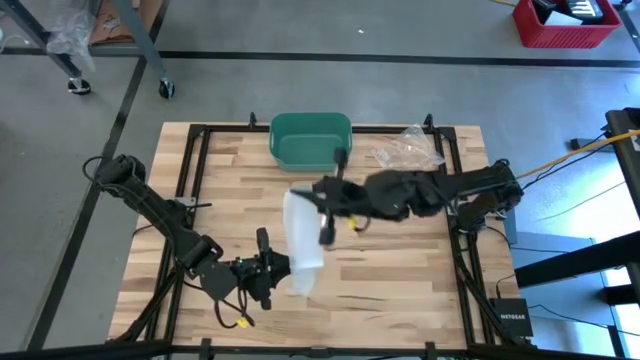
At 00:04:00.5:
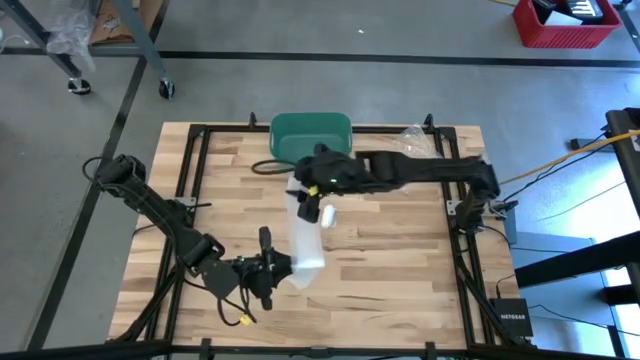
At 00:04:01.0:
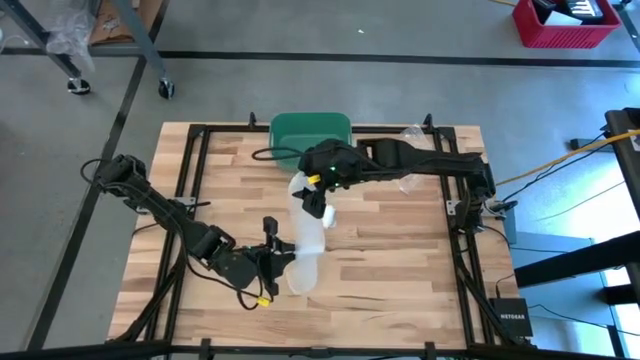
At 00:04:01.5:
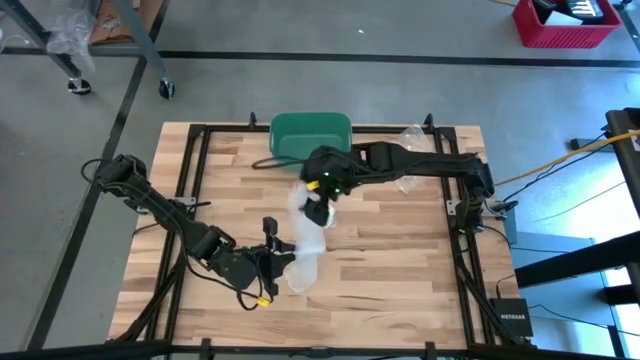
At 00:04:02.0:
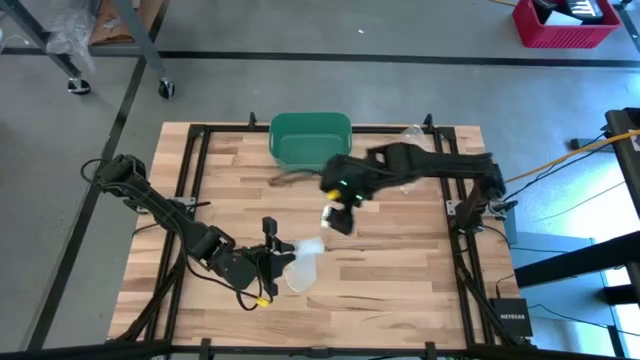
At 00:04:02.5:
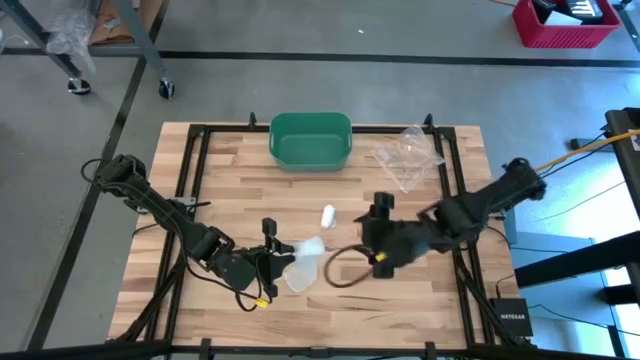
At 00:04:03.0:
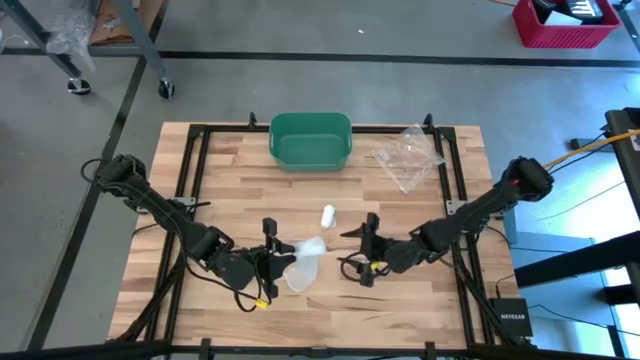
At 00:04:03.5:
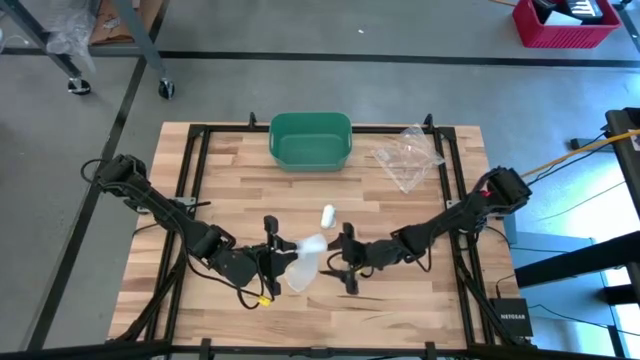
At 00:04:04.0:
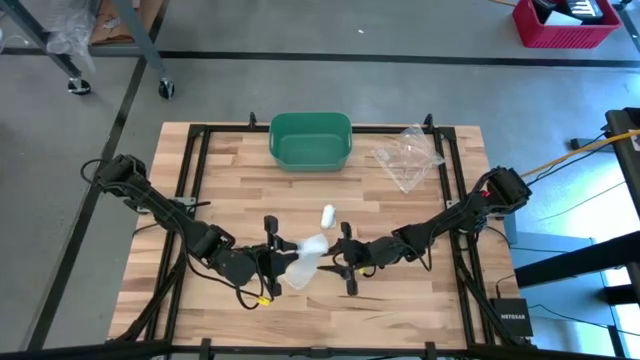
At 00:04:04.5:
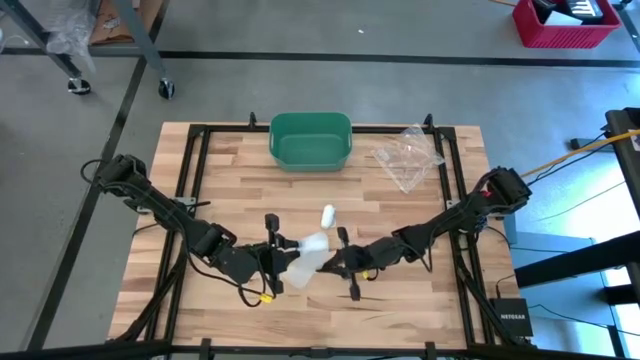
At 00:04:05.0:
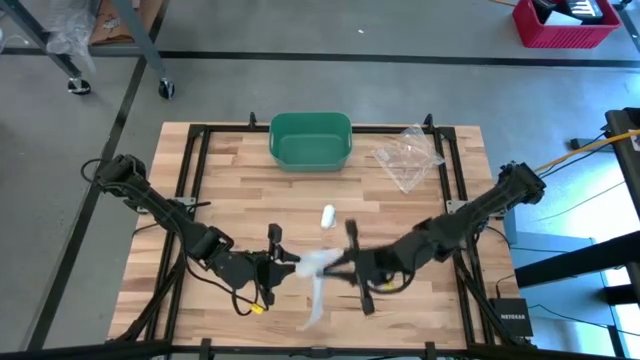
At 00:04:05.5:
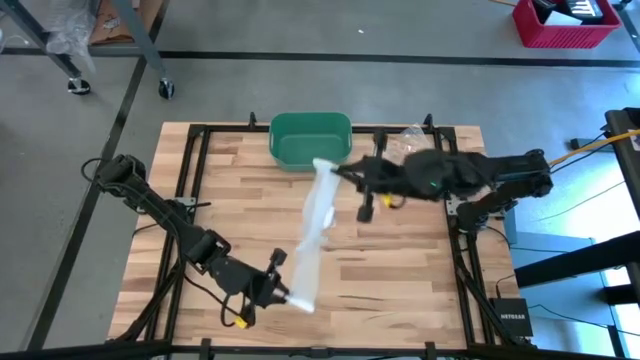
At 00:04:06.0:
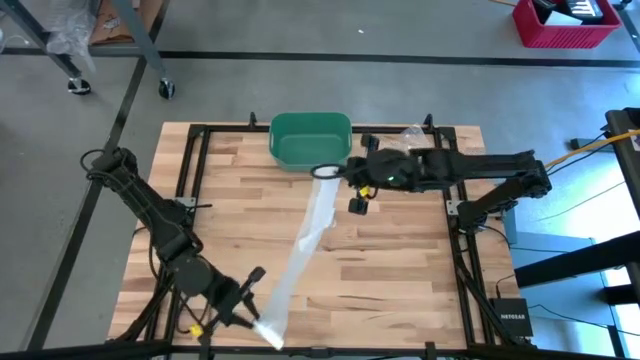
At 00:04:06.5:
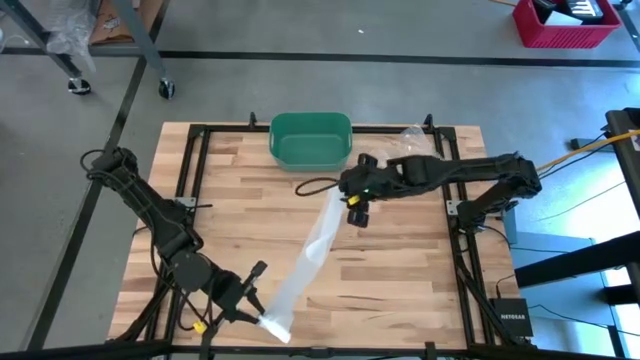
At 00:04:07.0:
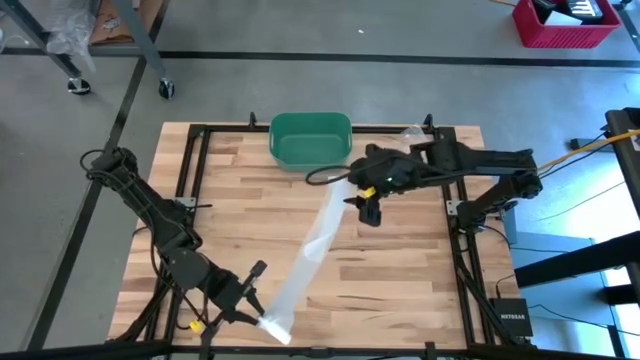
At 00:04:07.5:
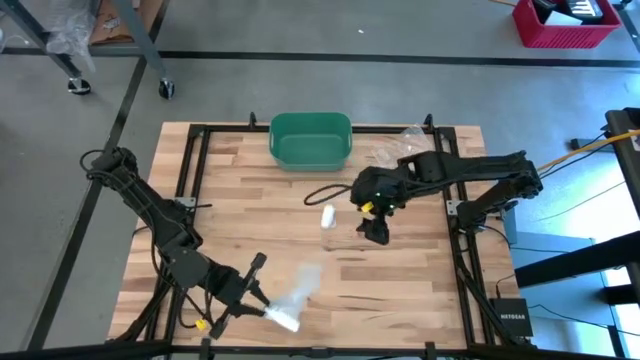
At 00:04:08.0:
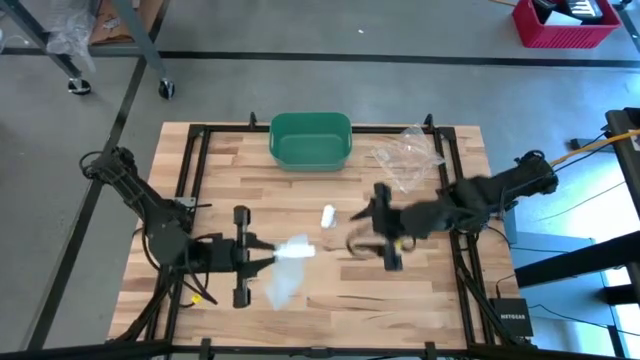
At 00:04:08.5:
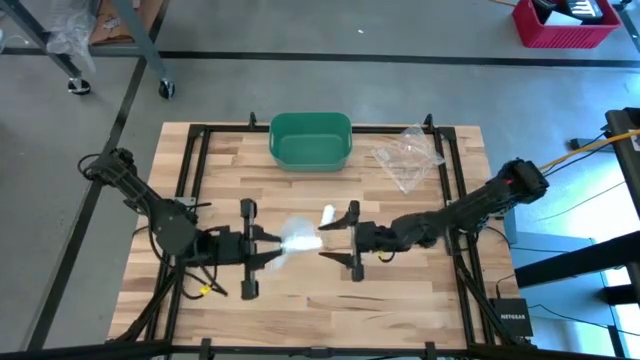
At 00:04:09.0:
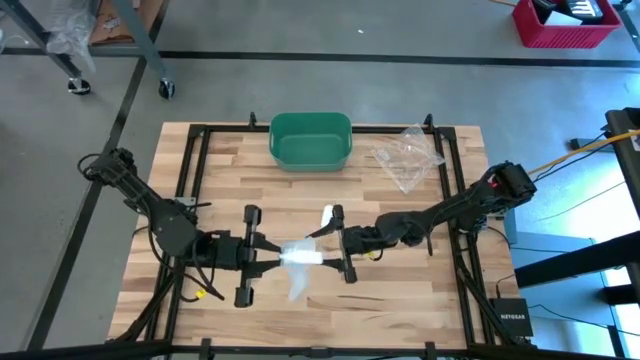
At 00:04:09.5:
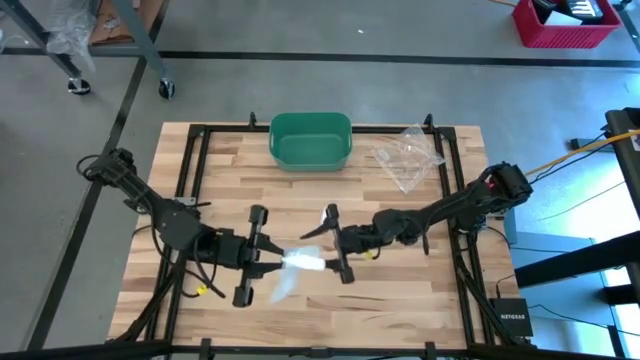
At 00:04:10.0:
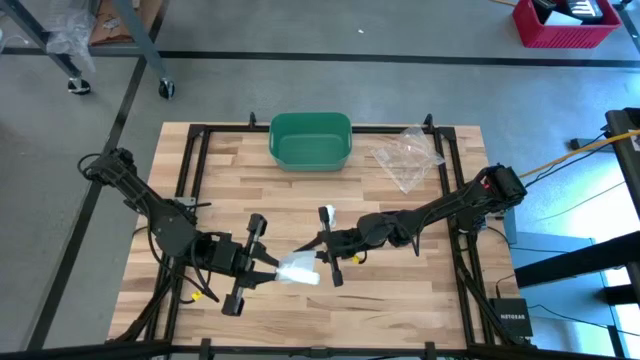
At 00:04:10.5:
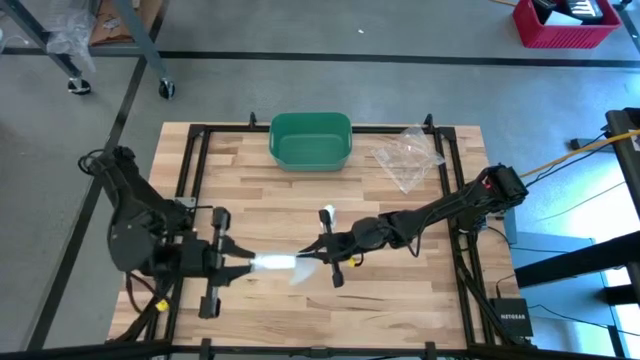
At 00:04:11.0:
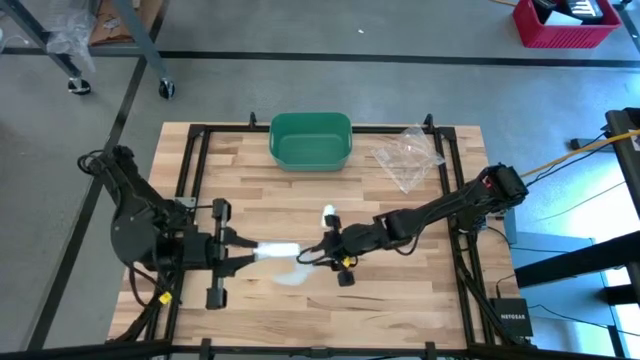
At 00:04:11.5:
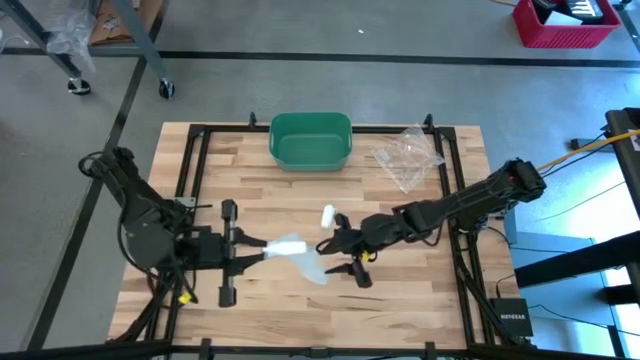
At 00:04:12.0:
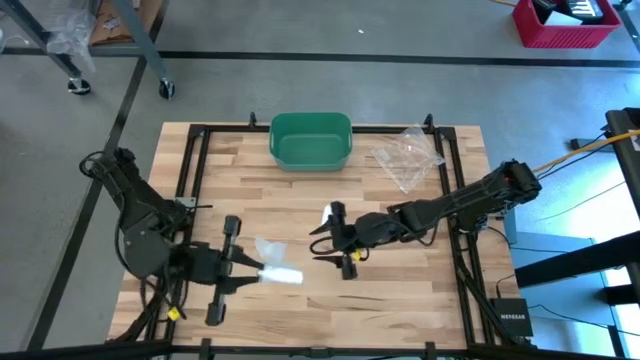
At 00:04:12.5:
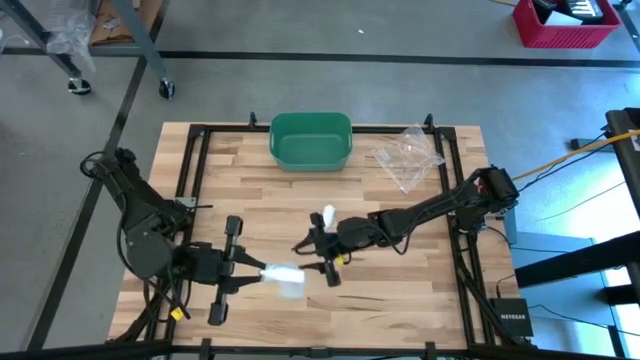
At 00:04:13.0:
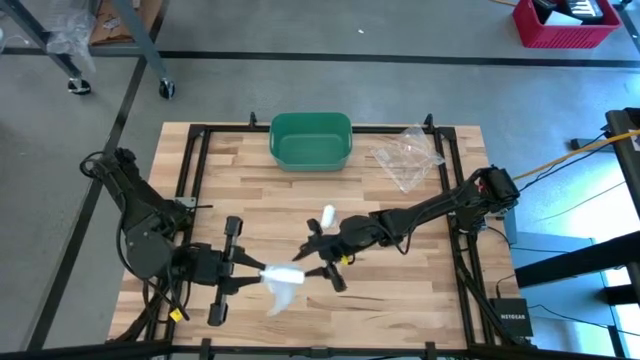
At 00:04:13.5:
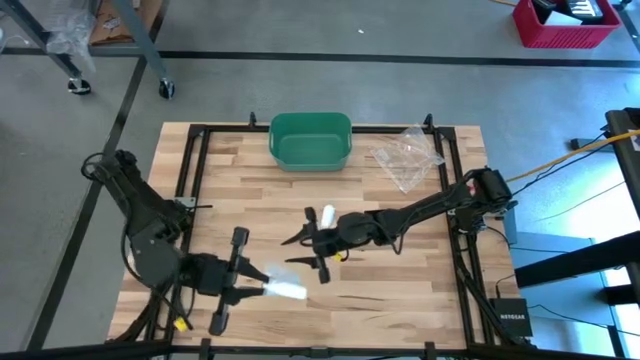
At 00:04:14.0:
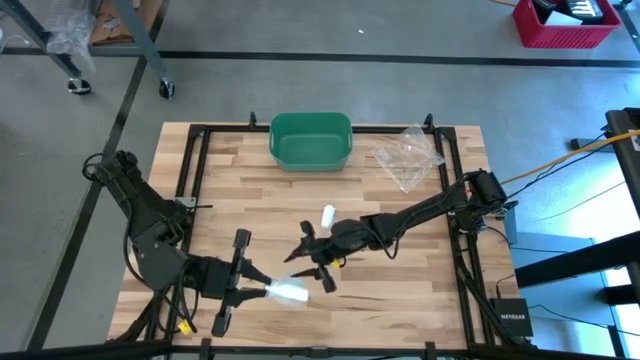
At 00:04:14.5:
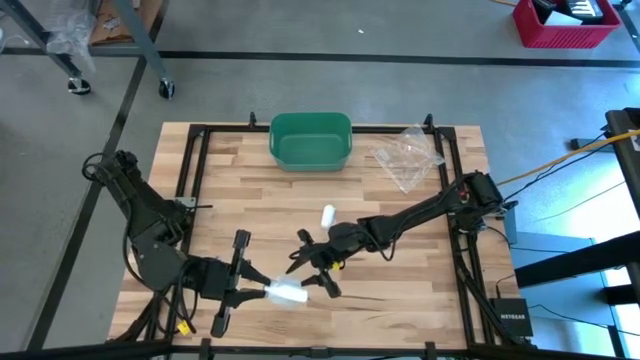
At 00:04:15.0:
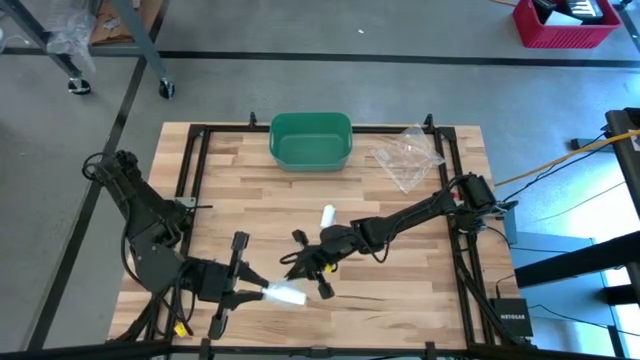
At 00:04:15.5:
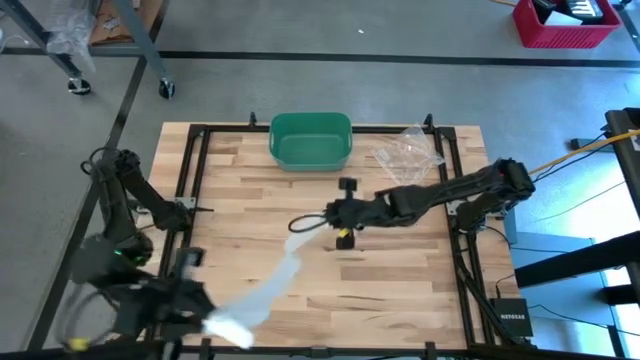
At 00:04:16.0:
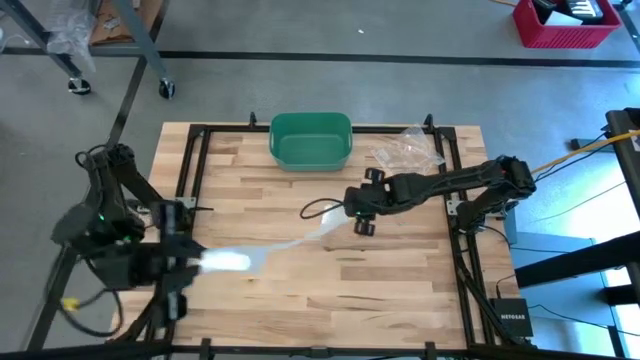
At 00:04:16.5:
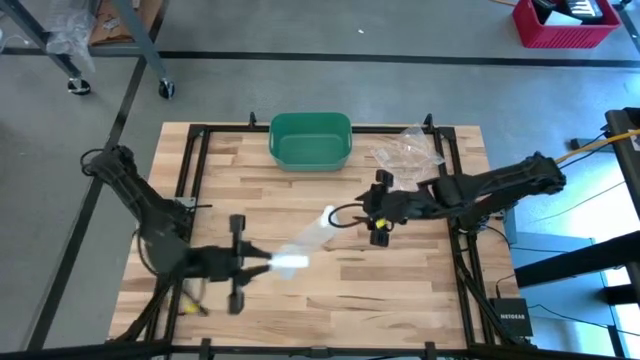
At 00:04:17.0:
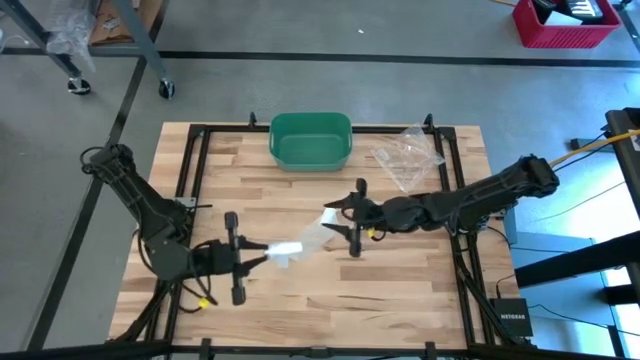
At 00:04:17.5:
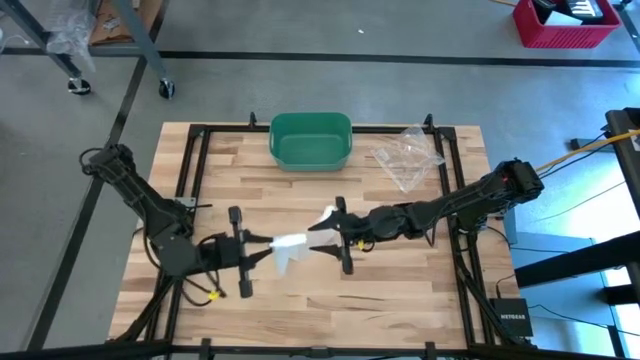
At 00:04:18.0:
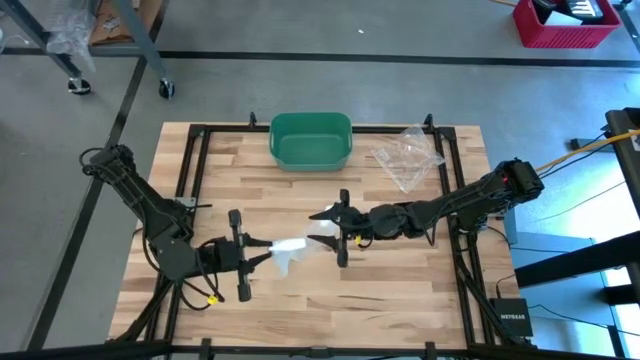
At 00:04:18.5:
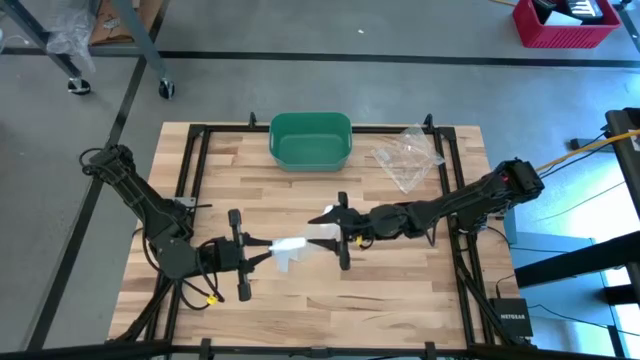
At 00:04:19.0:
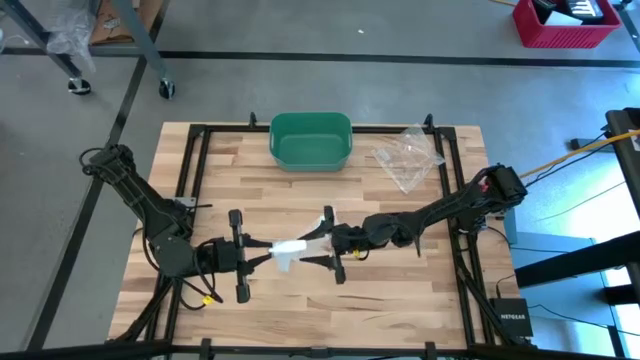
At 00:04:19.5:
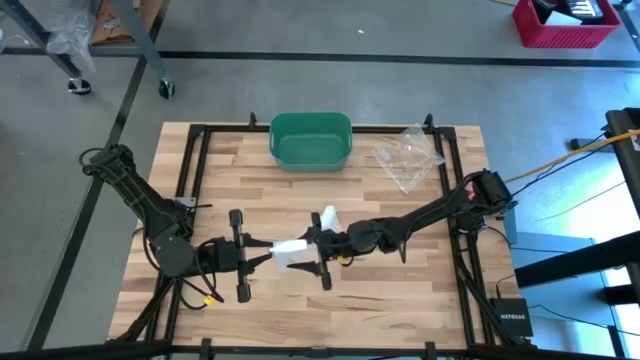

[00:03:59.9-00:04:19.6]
Task: Roll bandage
Roll the bottom white bandage
